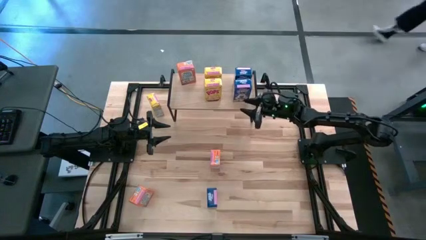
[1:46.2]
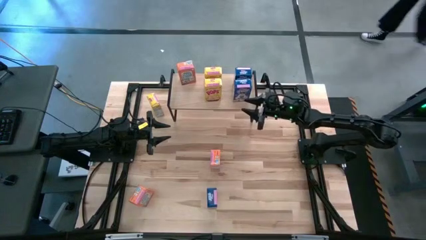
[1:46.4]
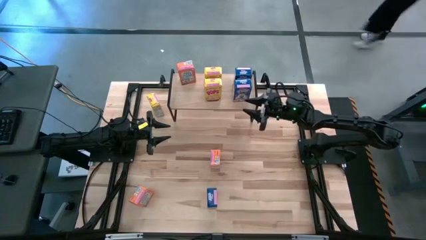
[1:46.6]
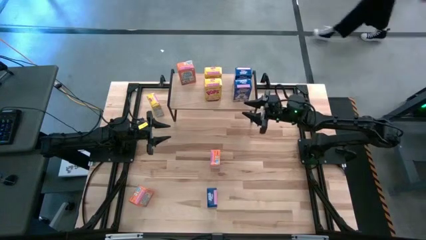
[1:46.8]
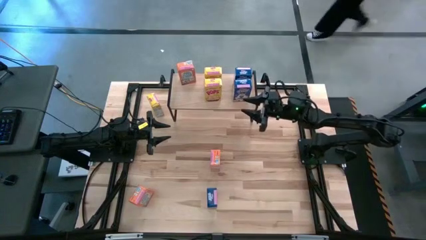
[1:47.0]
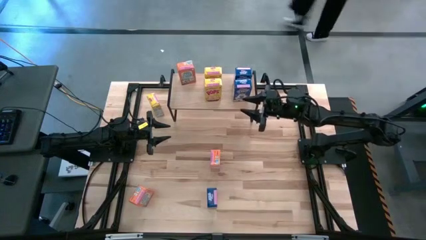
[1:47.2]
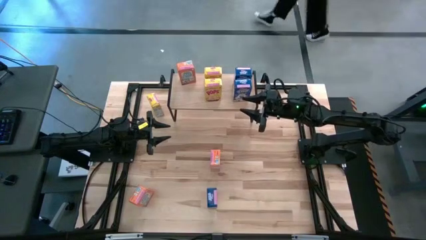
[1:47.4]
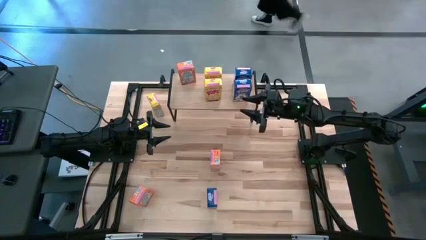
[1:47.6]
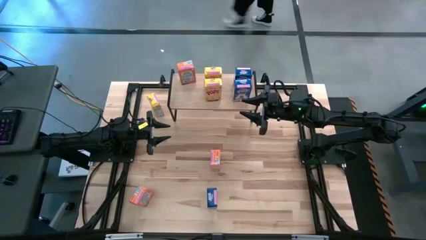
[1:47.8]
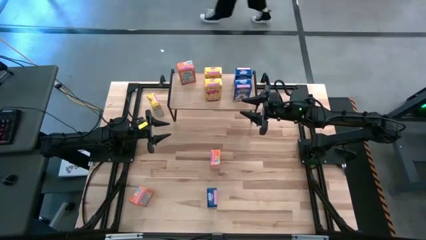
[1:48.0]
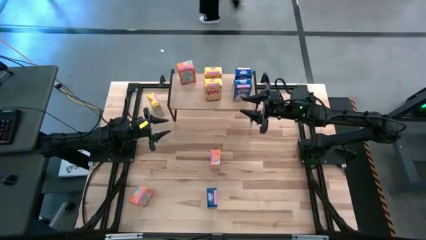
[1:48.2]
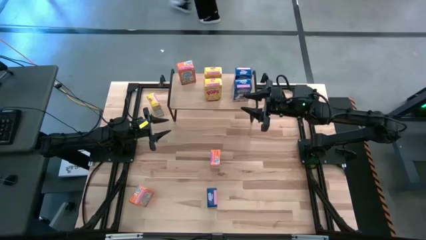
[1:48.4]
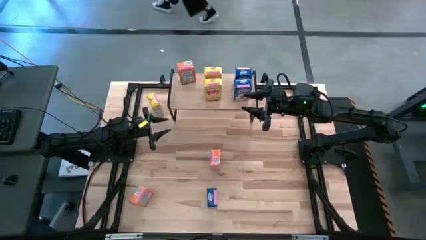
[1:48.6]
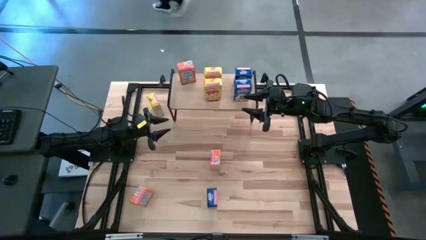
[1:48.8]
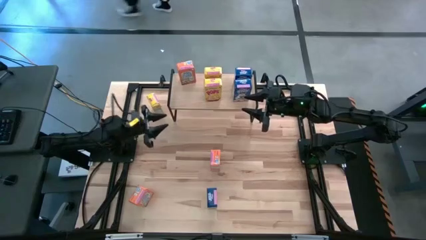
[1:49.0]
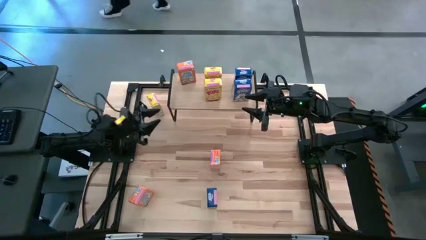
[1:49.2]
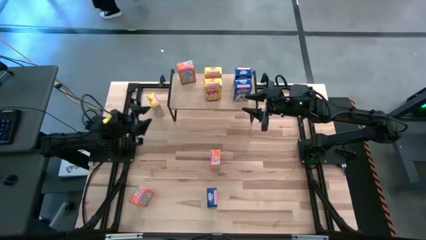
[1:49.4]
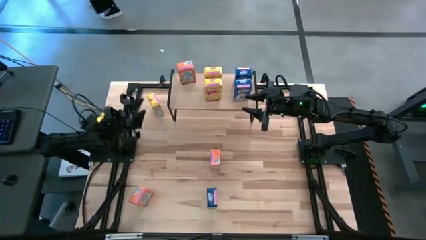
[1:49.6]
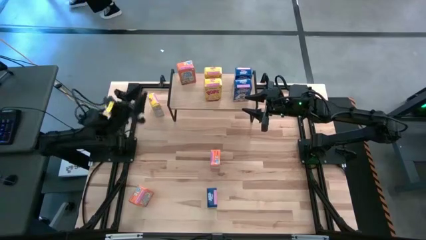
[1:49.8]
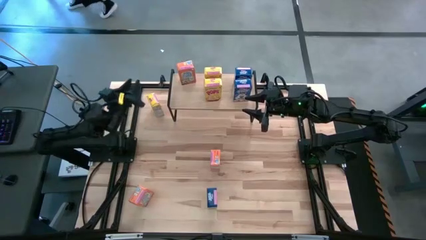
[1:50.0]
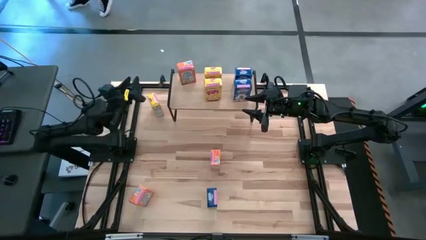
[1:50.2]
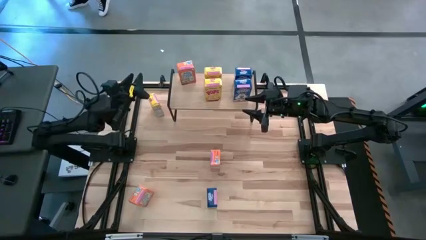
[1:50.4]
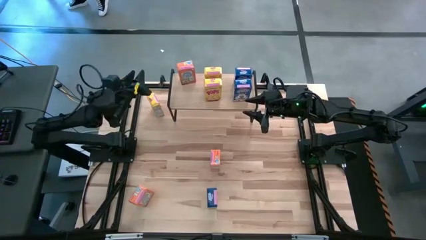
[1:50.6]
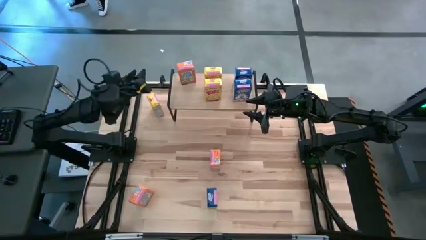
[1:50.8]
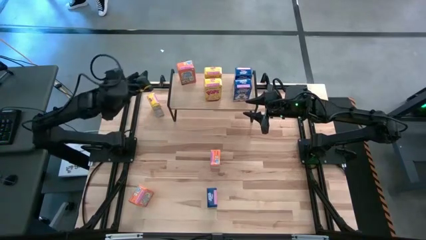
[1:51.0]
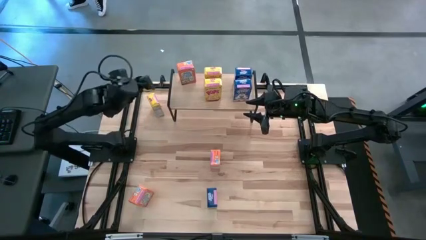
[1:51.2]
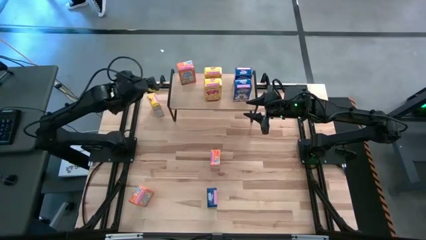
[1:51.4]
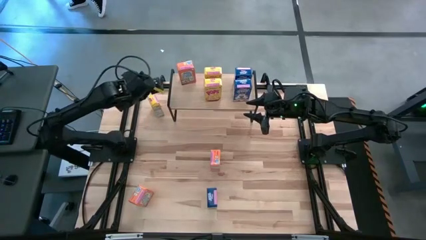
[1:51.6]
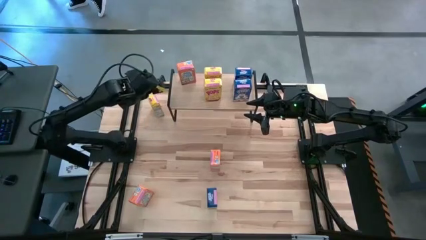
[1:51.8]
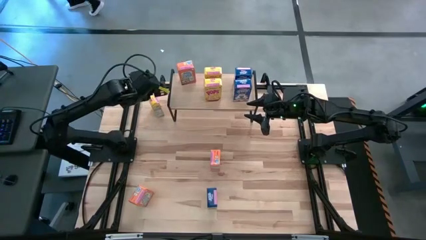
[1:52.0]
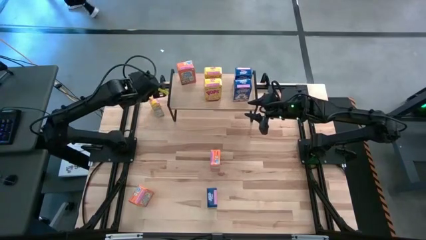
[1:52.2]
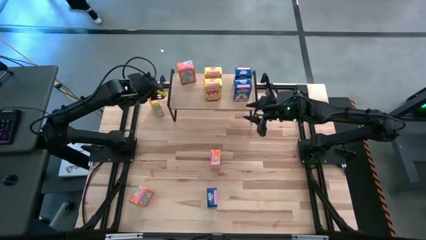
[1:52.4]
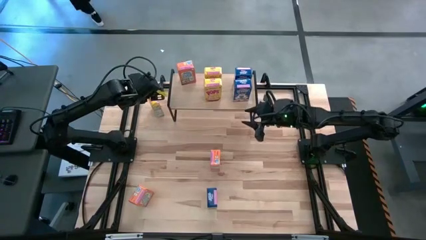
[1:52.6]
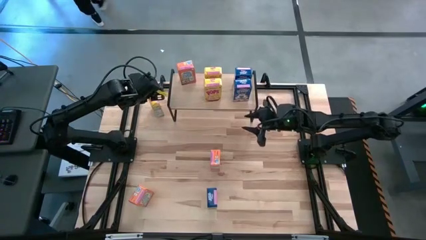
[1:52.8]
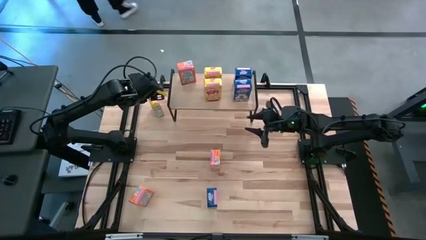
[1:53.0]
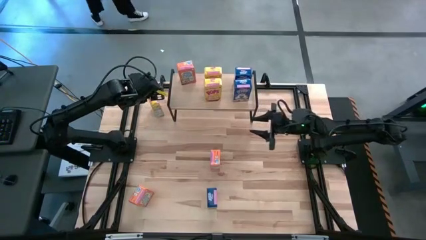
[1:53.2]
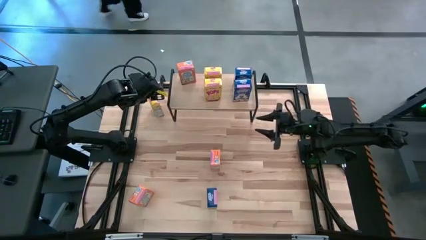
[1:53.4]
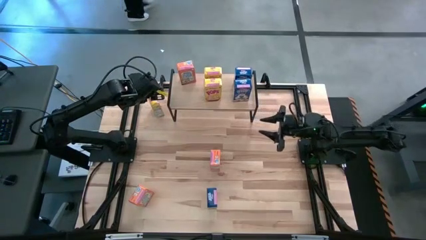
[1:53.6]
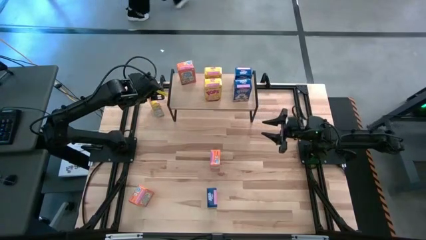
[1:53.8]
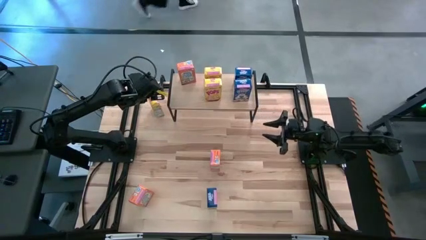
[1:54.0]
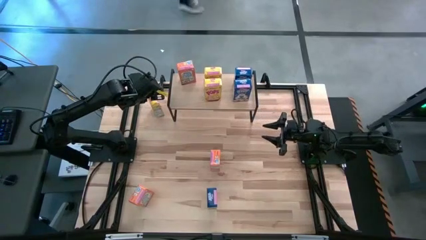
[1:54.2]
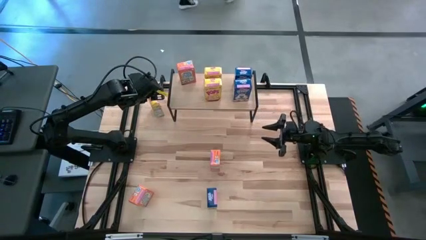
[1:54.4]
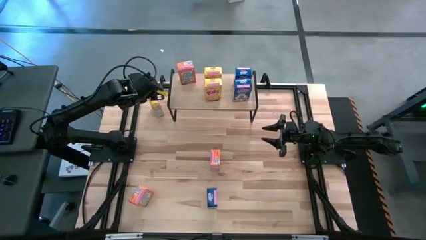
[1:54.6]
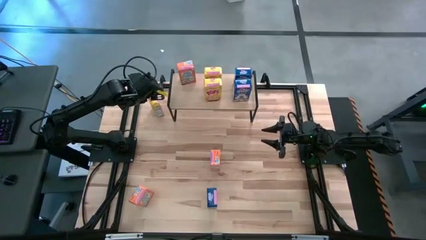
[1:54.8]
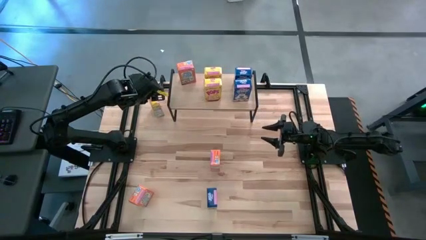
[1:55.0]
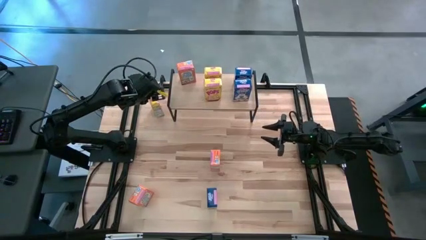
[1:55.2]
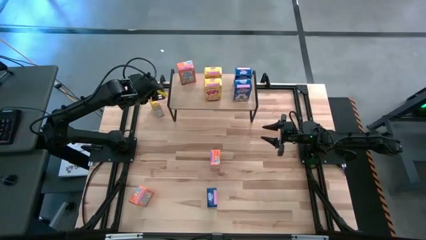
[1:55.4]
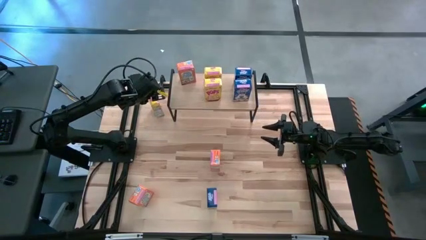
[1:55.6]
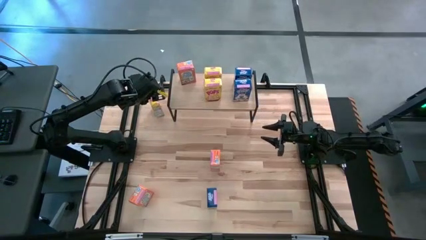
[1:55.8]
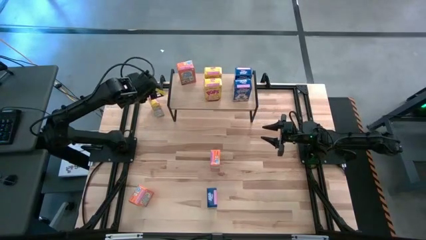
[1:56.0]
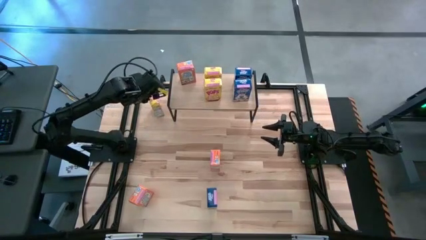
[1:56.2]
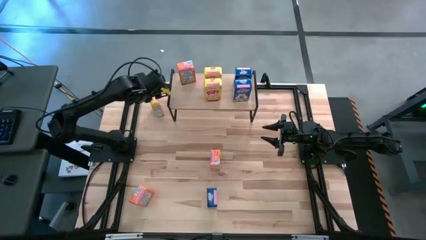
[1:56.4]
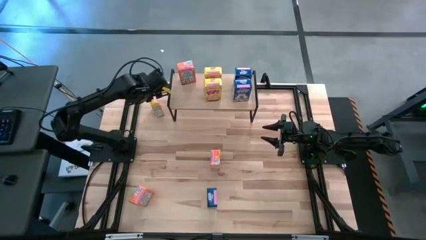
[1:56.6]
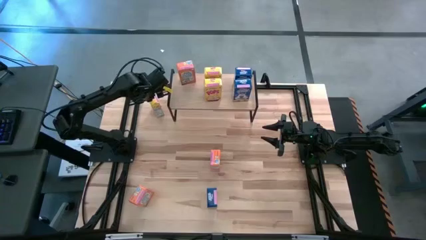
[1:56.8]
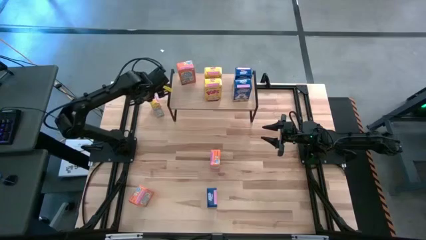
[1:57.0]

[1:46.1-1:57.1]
Task: Stack cereal on shelf
Put the yellow cereal box on the shelf aligned with the other yellow cereal boxes
